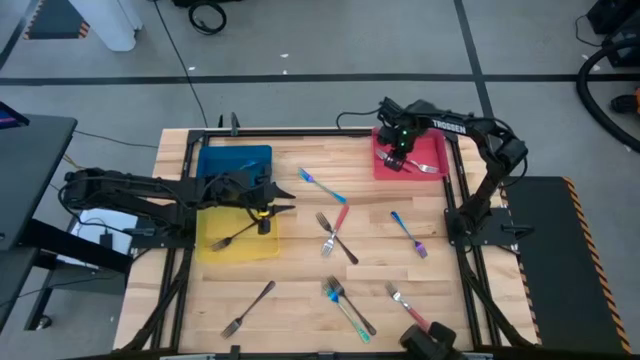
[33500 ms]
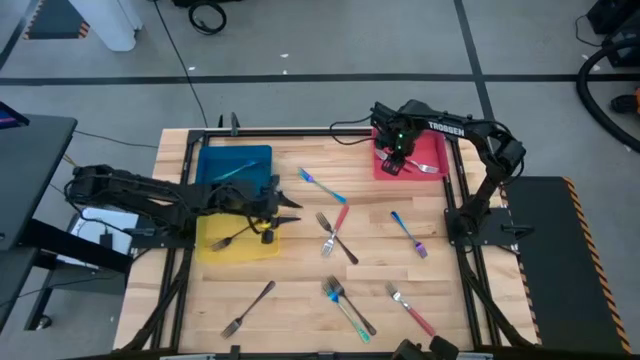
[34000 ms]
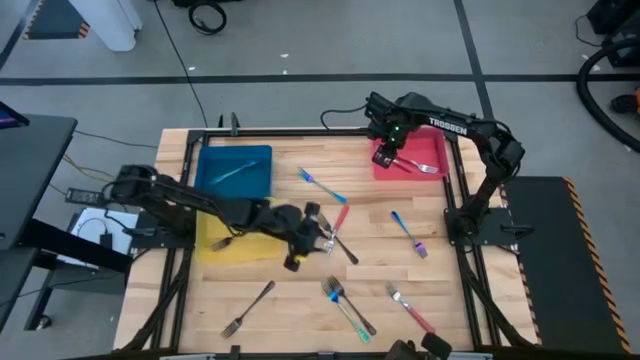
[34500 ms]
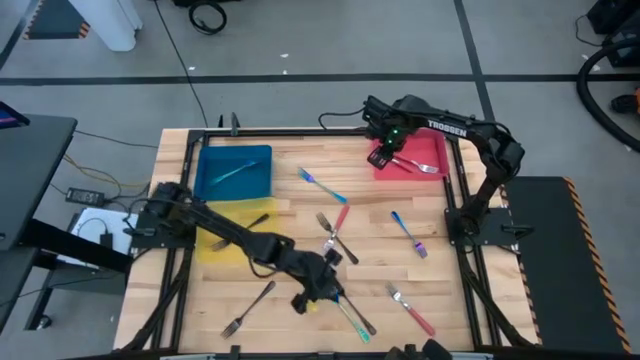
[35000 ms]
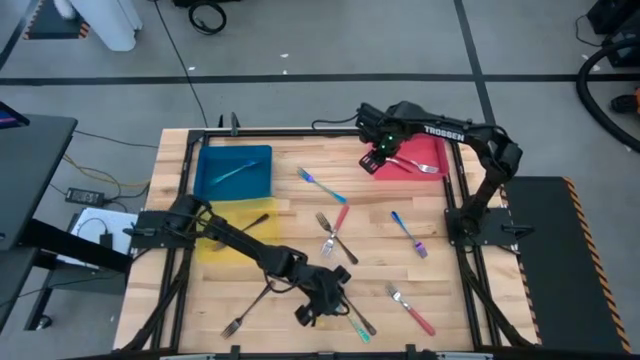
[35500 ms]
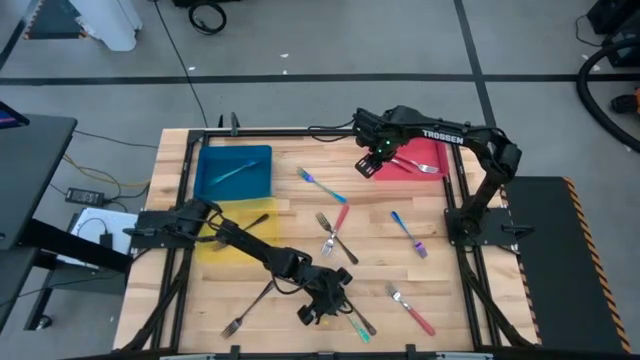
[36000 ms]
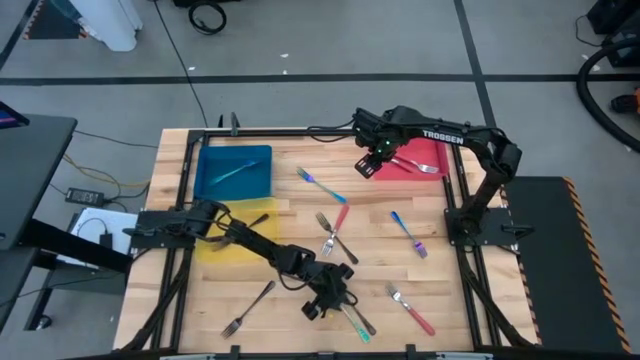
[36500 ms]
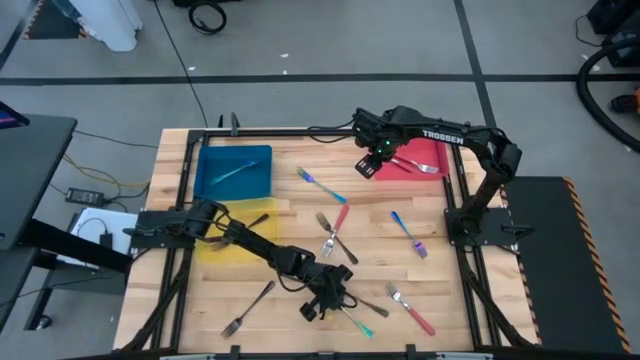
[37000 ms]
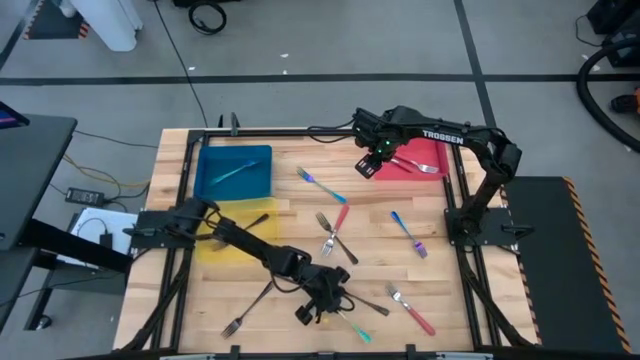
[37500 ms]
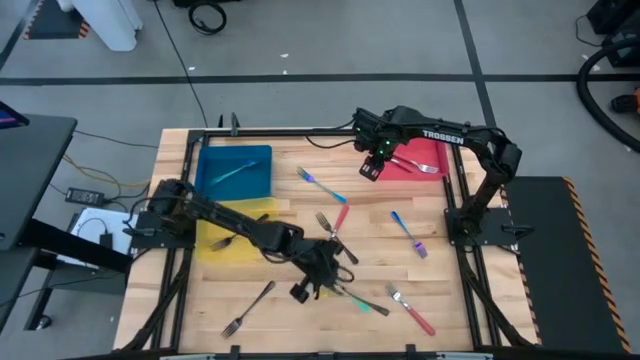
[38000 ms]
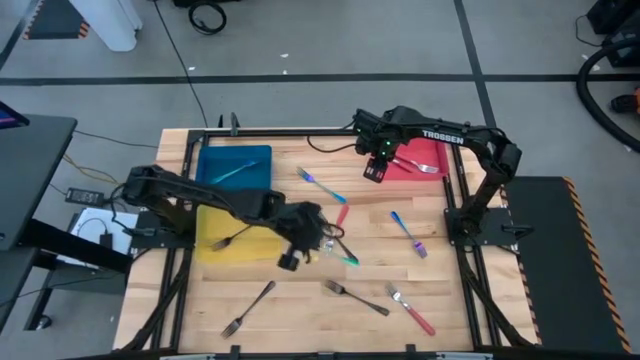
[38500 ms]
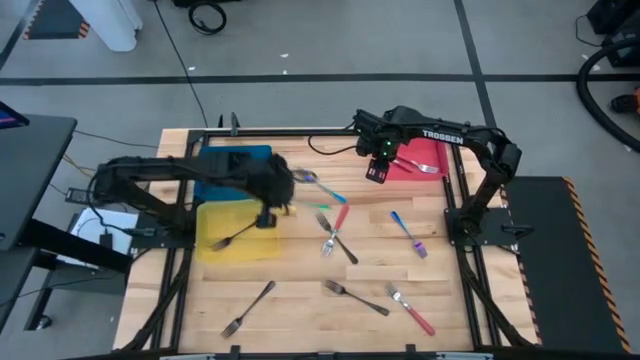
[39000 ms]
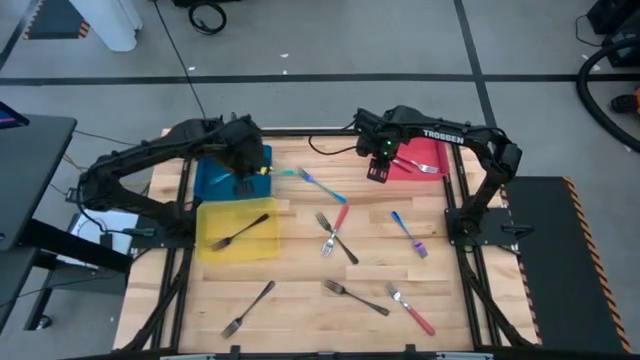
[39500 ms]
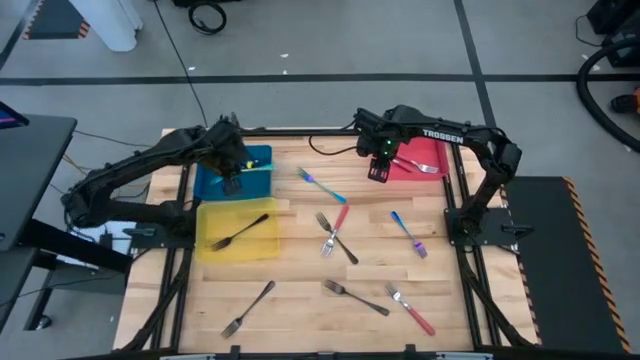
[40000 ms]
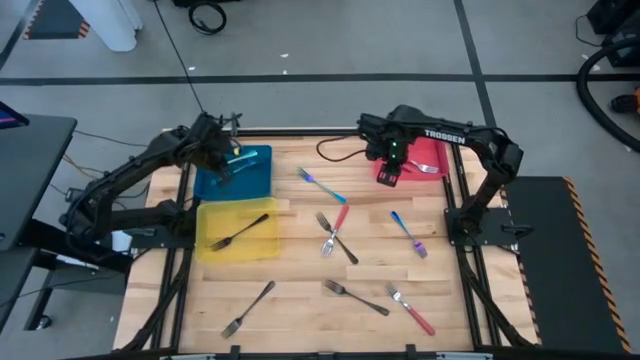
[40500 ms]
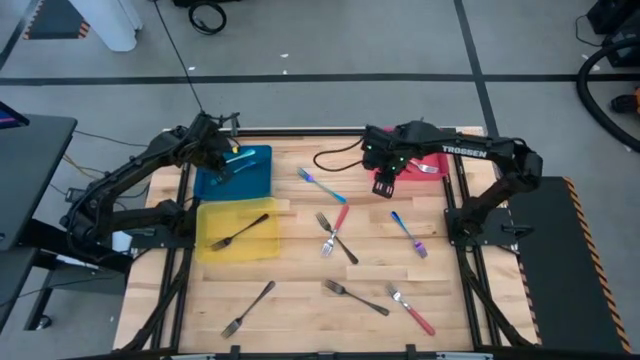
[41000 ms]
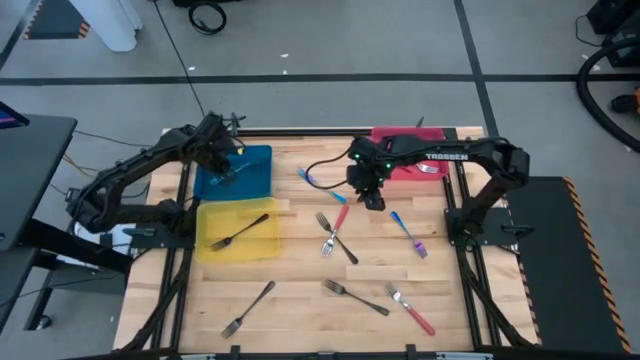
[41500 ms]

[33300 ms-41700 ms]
Task: Sort silverware by color (type)
Put the blue fork into the blue bin

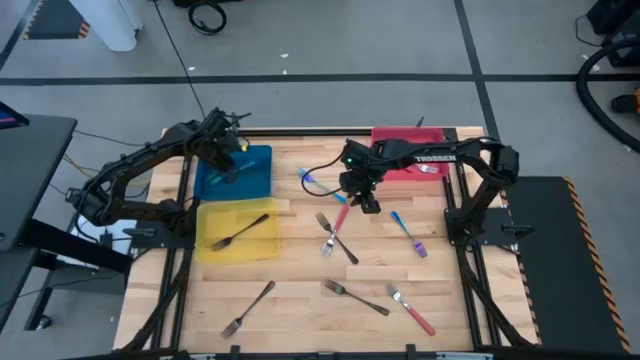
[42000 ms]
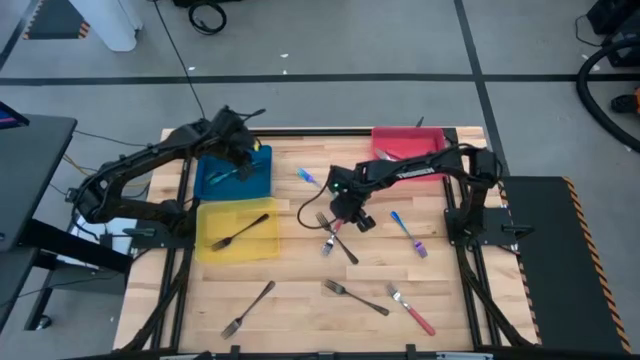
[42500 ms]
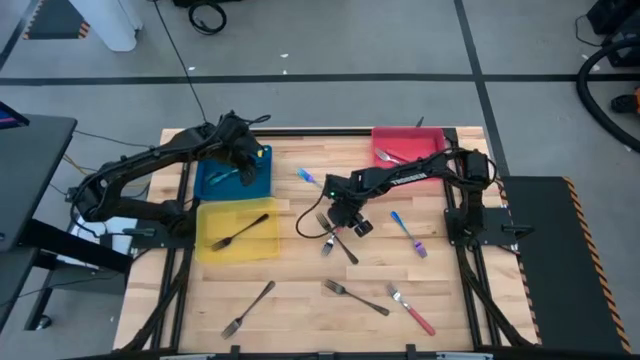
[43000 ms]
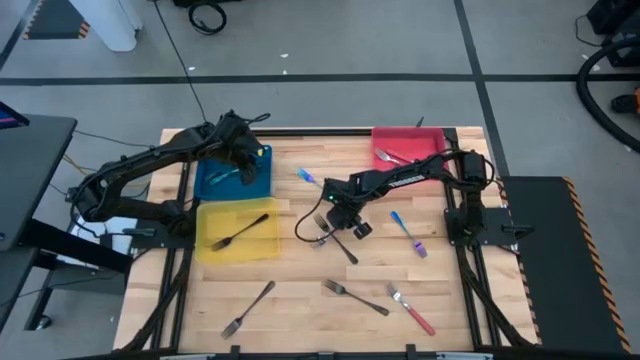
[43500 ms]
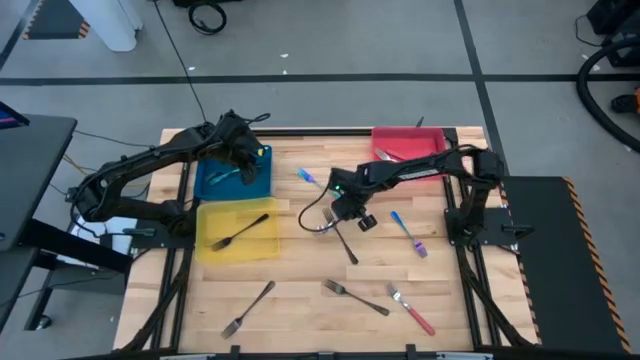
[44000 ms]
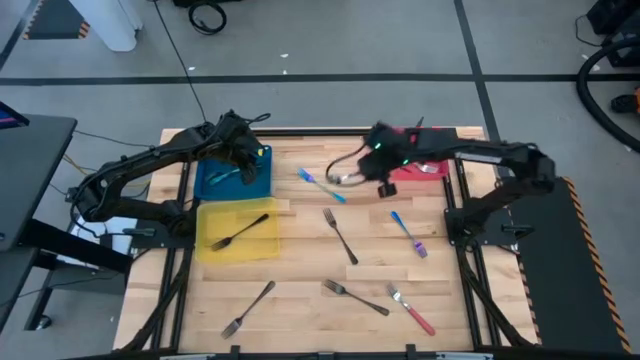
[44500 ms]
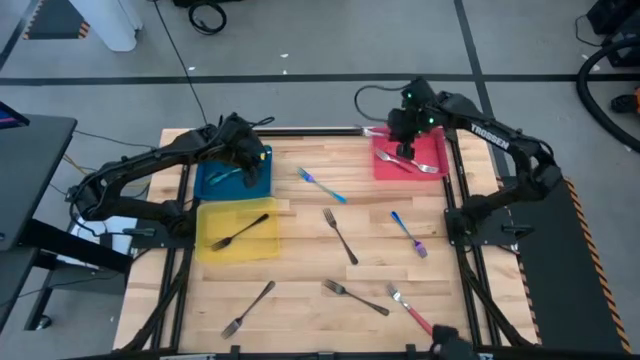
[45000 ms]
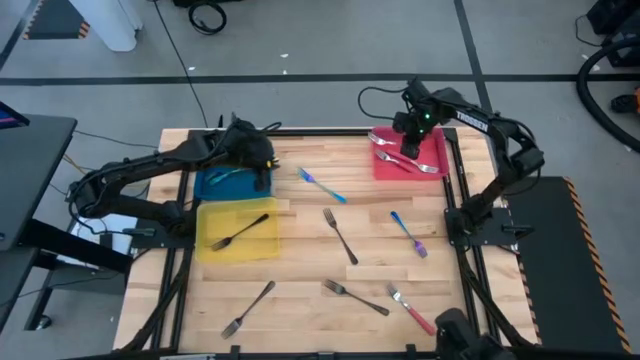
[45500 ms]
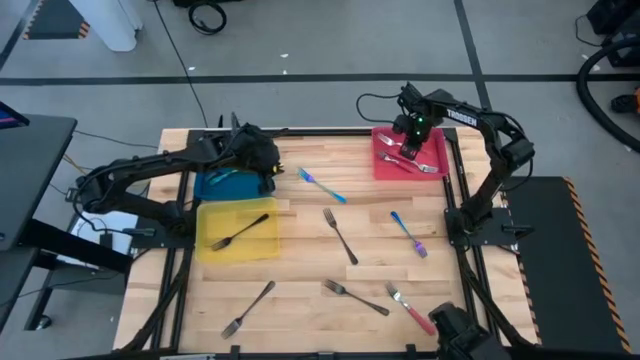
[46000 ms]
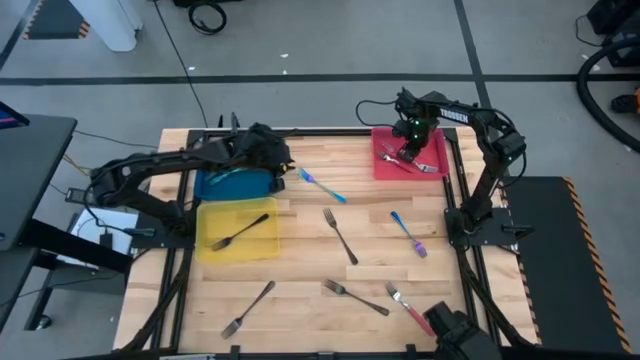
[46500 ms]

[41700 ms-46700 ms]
Put the red fork into the red bin

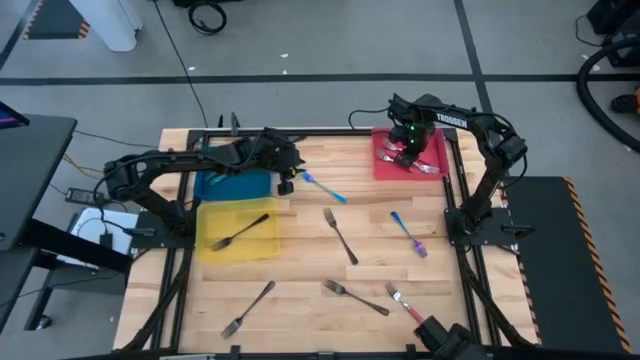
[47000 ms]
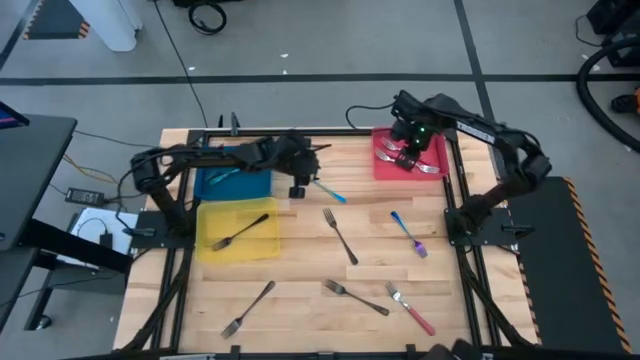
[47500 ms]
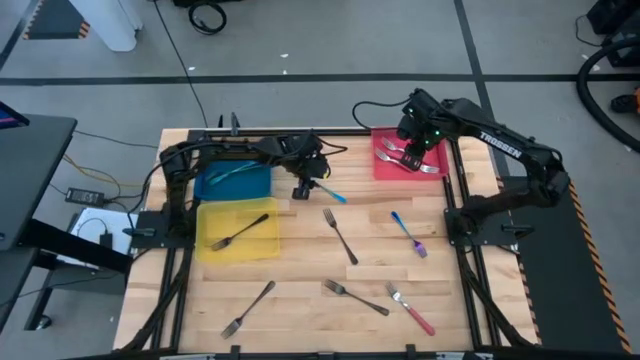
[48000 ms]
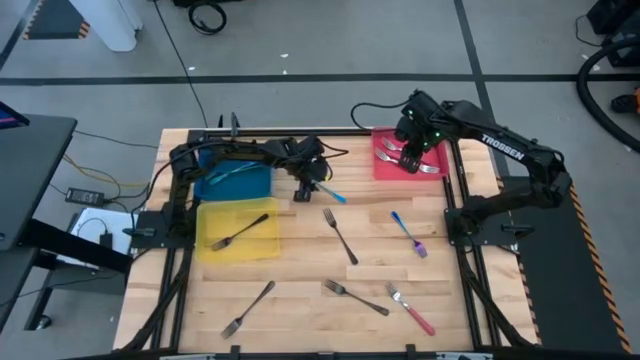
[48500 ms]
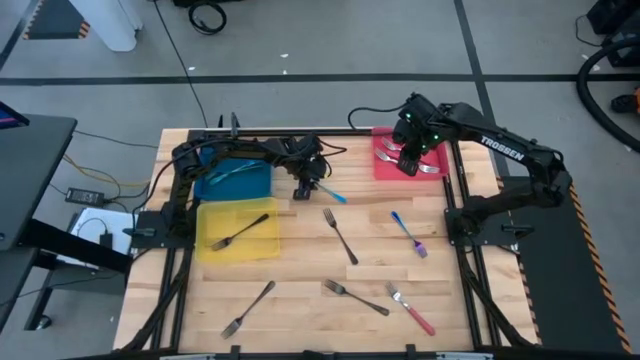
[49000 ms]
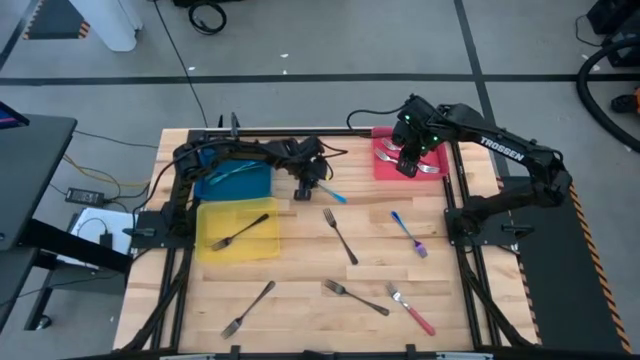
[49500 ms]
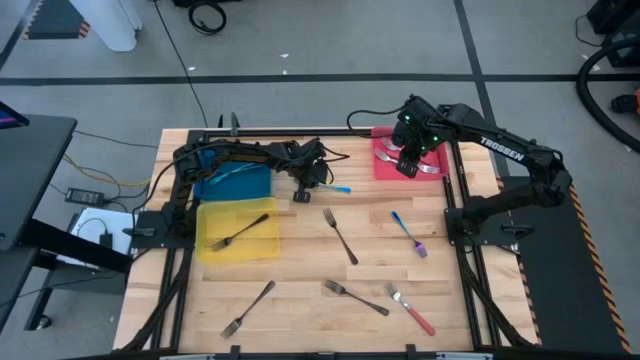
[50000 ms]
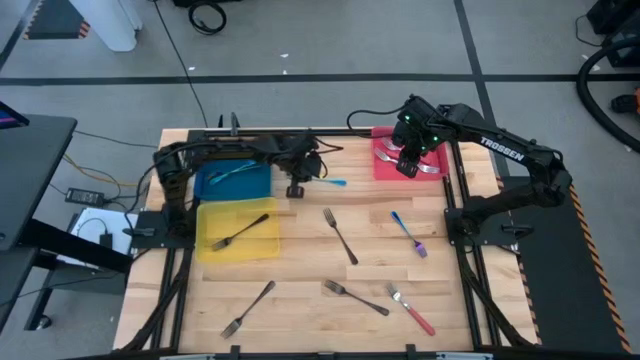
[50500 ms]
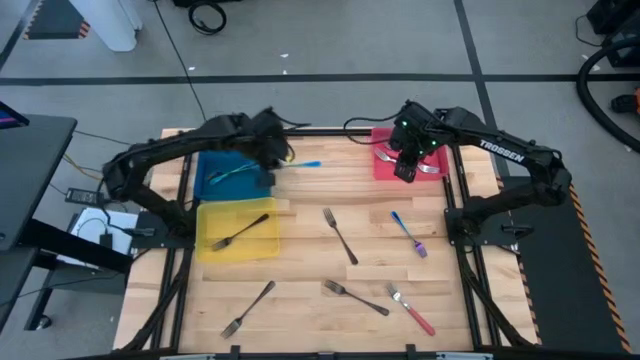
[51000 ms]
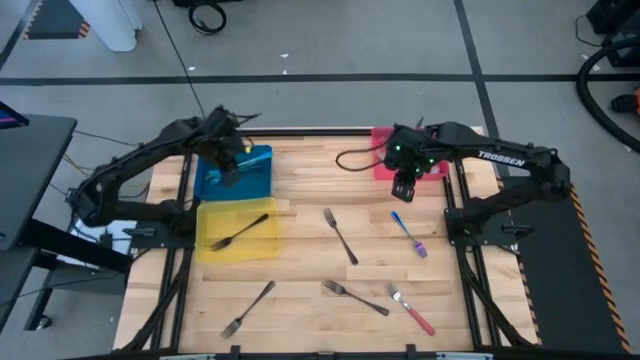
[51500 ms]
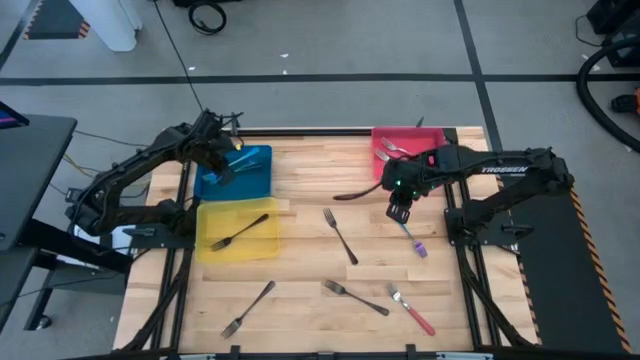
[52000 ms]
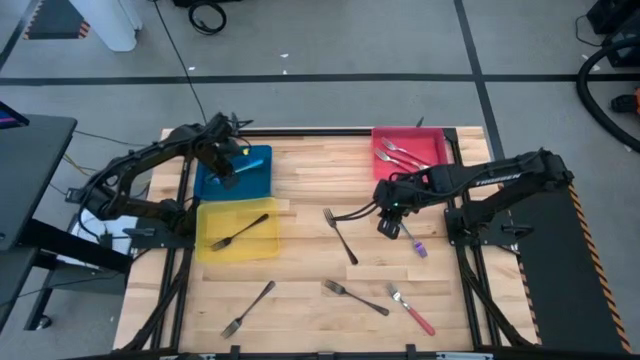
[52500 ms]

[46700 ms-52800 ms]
Put the blue fork into the blue bin

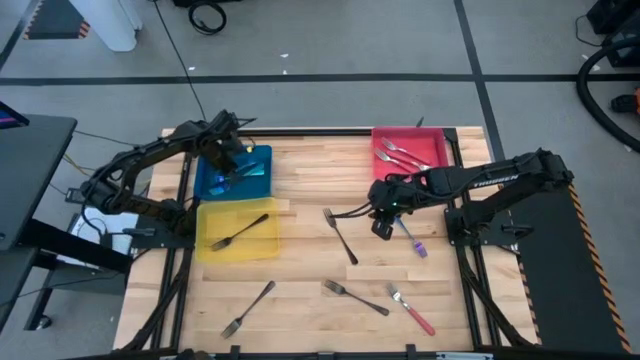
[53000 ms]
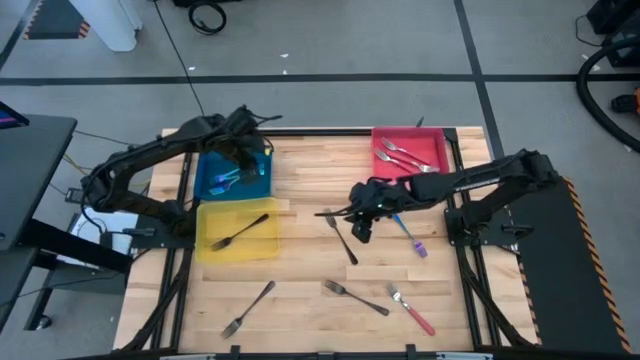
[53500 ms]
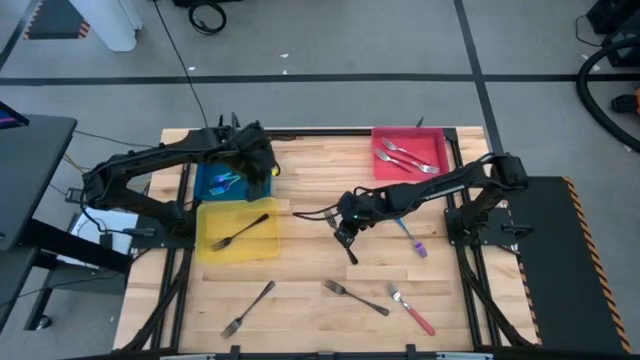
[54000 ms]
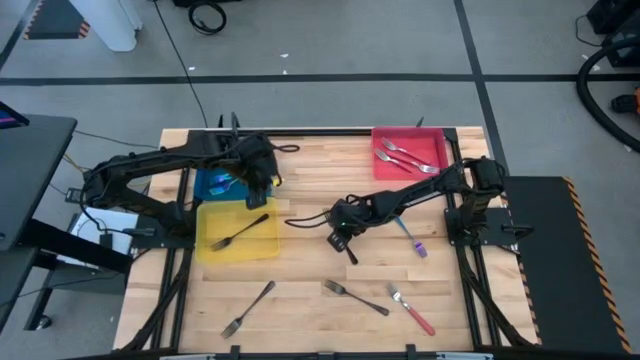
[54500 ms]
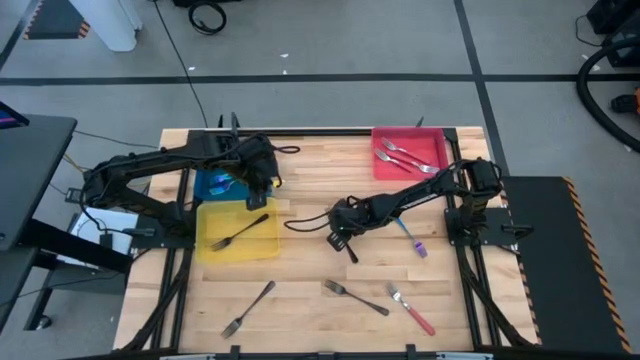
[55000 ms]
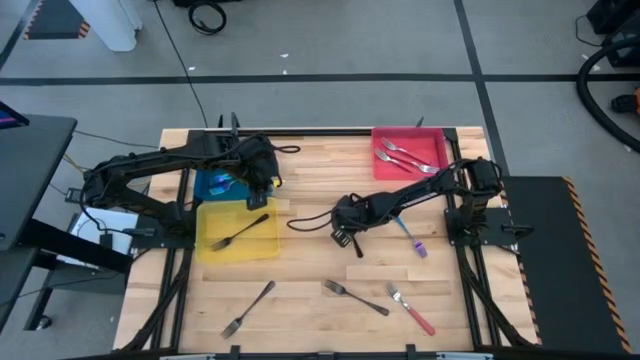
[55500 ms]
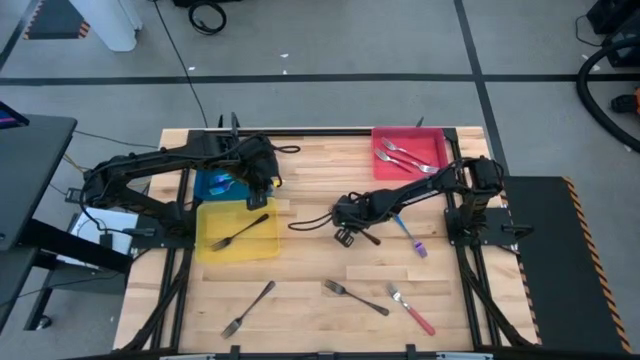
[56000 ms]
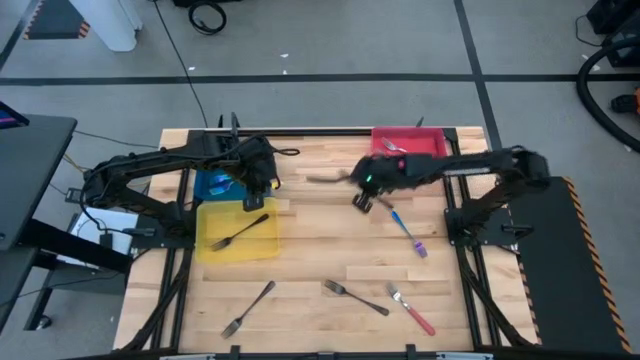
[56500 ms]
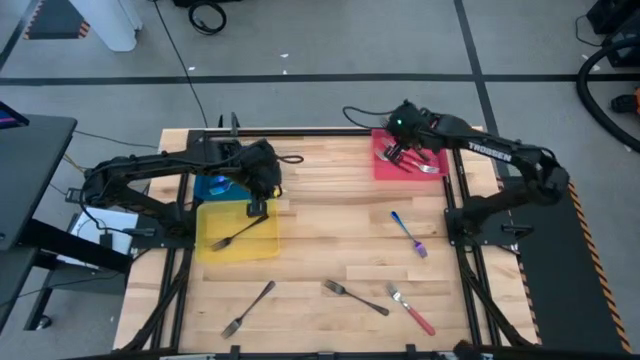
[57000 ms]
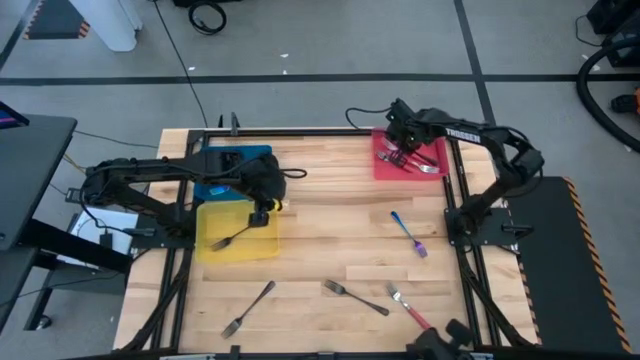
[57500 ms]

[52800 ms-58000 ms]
Put the black fork into the yellow bin
